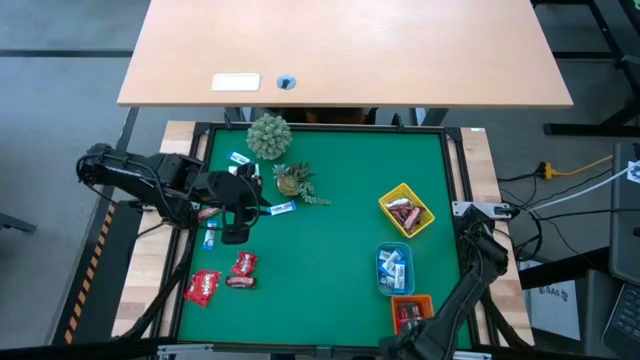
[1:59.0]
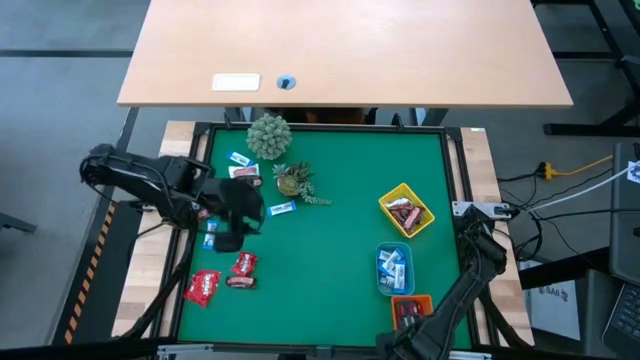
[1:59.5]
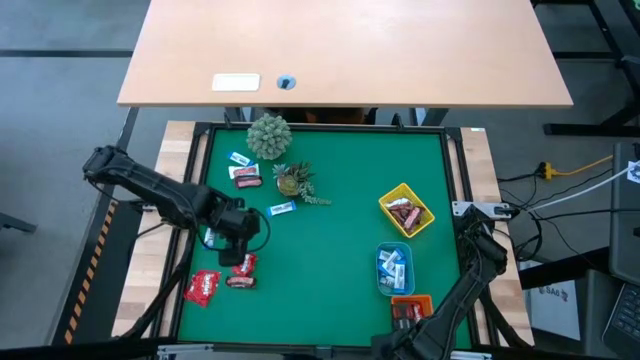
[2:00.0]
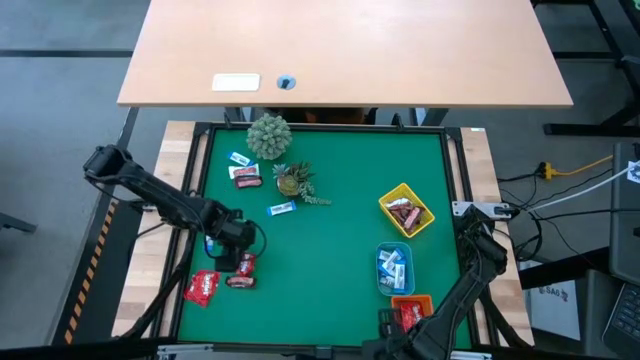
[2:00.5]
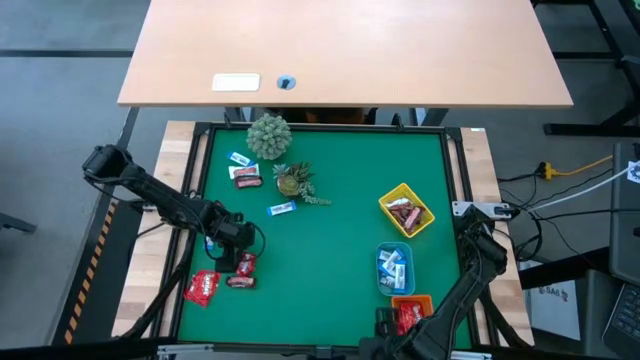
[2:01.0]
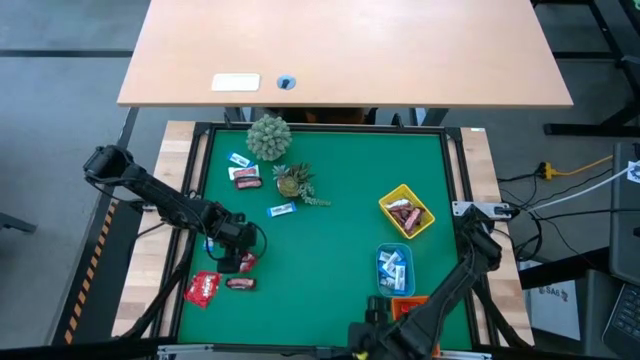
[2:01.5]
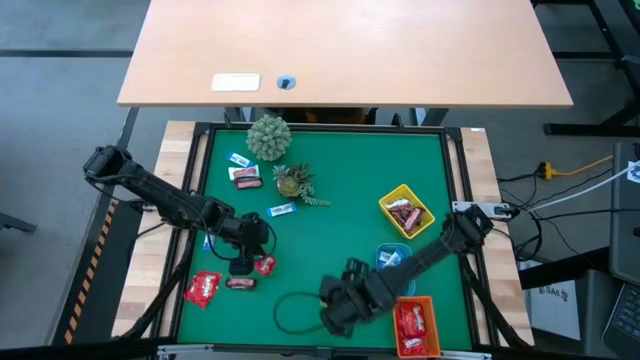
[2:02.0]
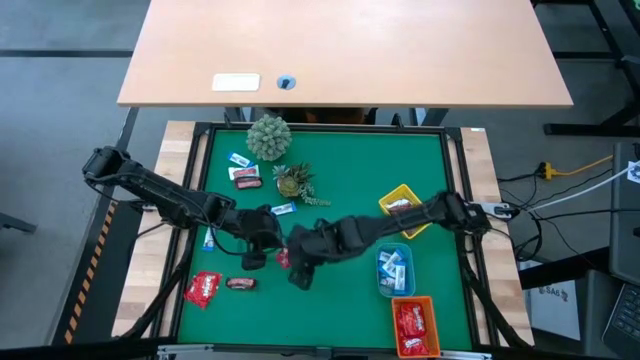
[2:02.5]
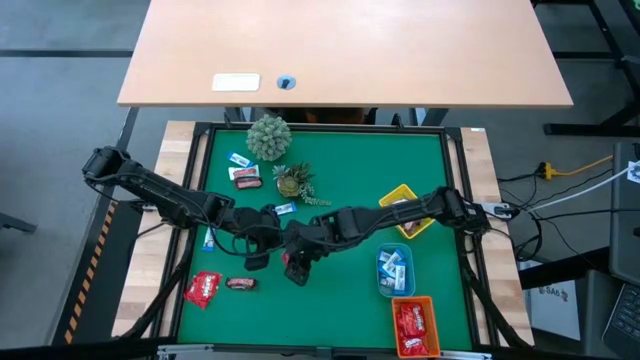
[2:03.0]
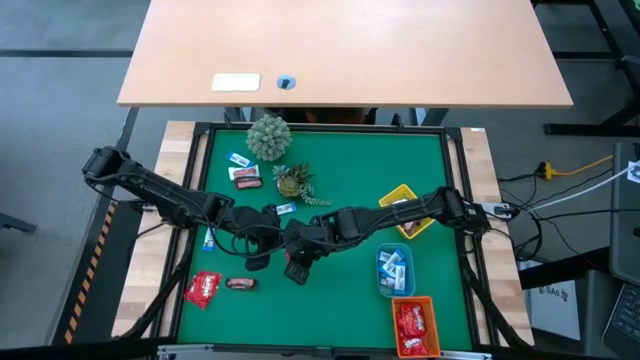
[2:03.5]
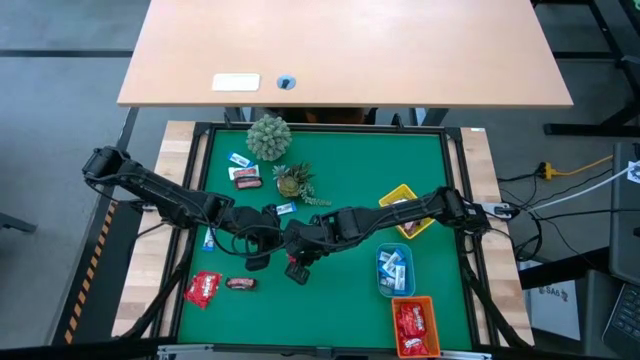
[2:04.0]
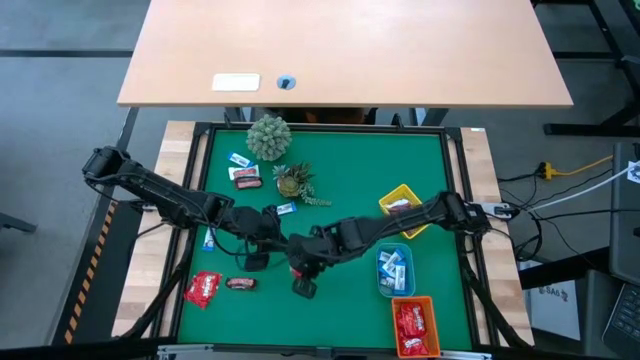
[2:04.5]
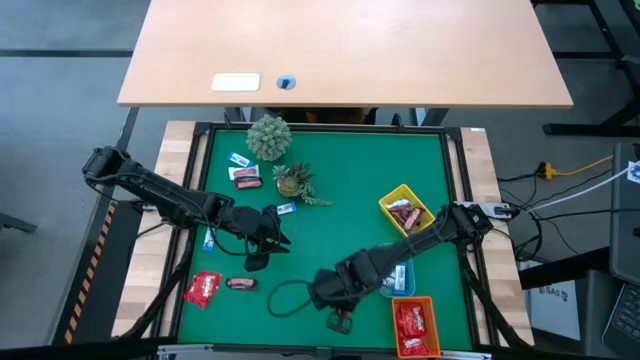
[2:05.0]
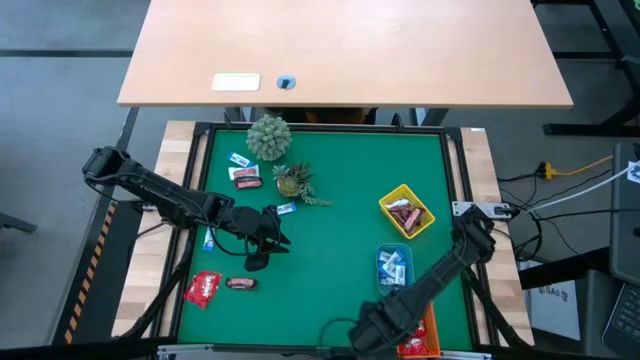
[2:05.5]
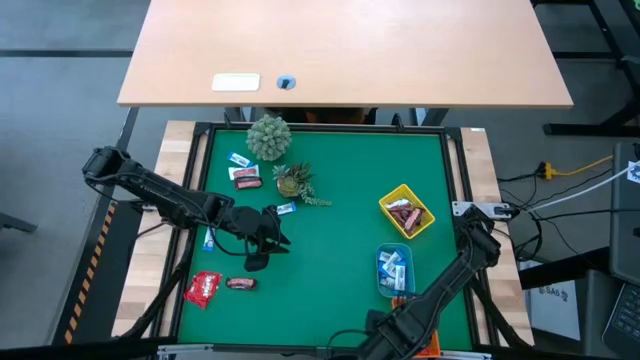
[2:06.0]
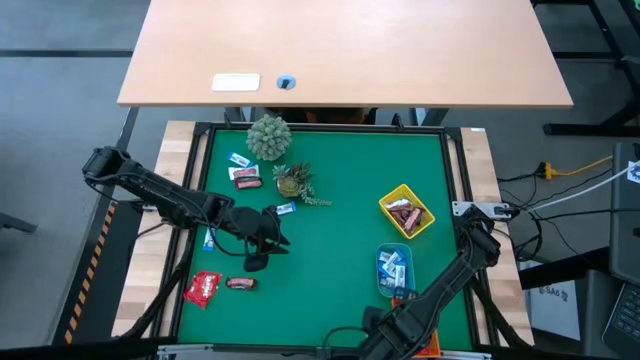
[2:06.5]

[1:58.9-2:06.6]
Task: Sort candy
Put the red candy into the orange bin

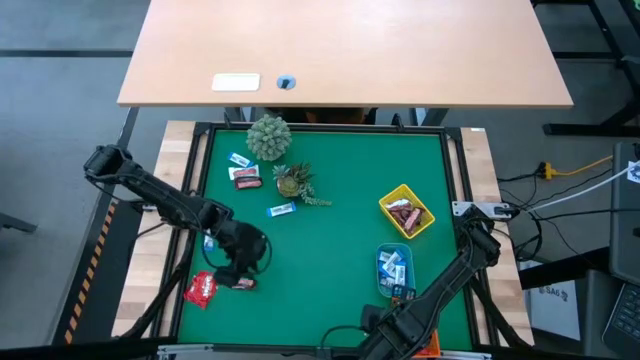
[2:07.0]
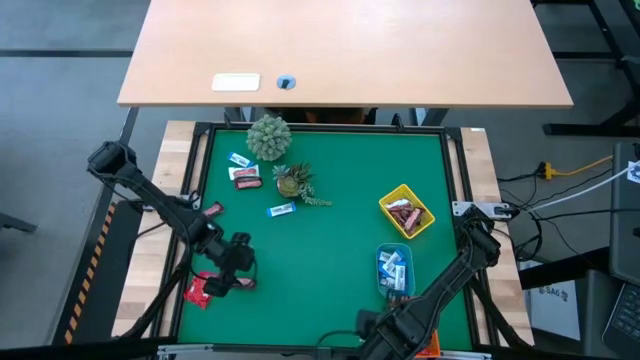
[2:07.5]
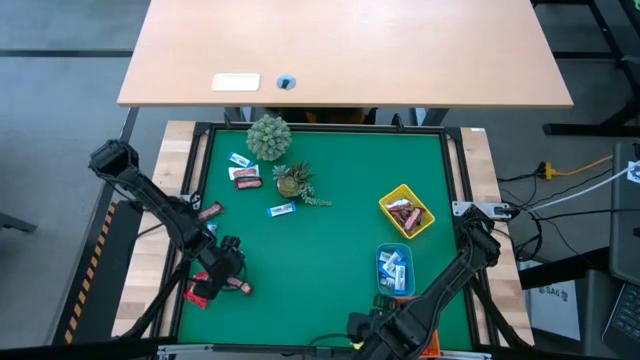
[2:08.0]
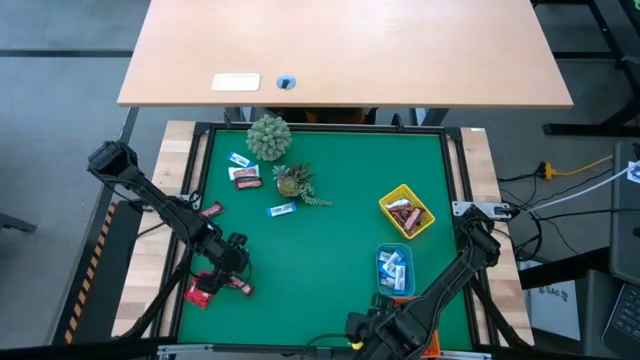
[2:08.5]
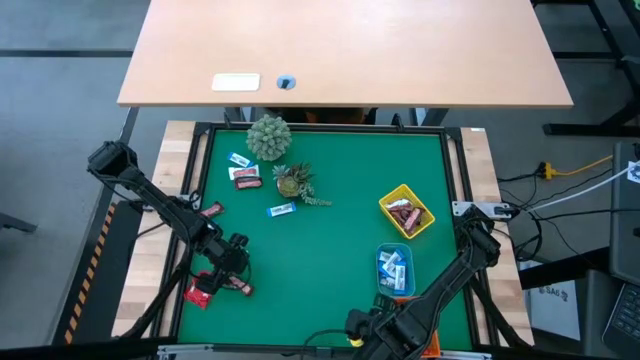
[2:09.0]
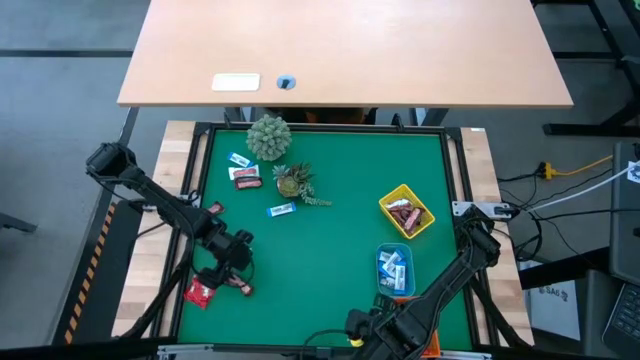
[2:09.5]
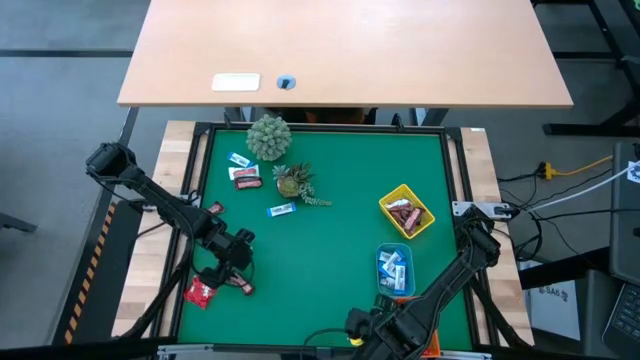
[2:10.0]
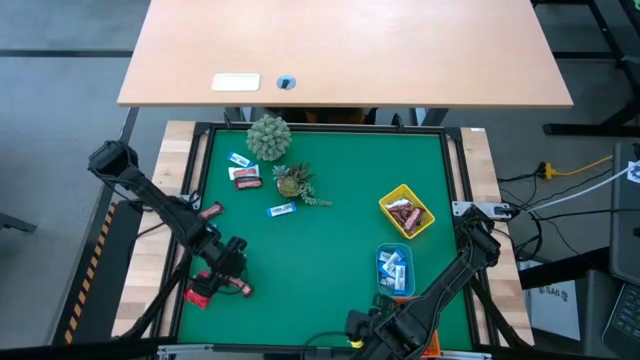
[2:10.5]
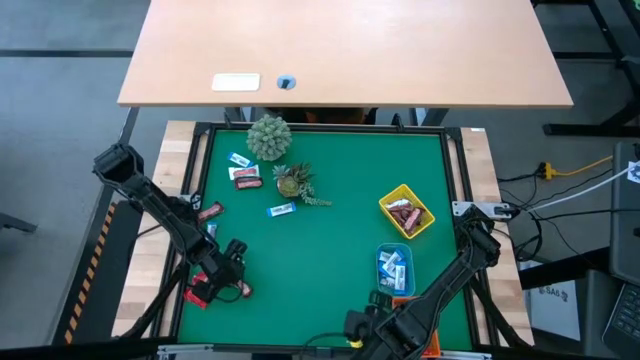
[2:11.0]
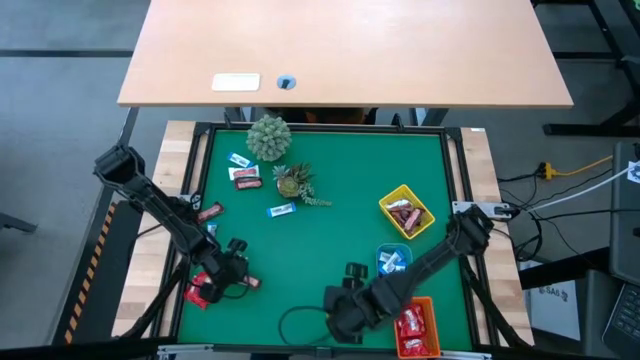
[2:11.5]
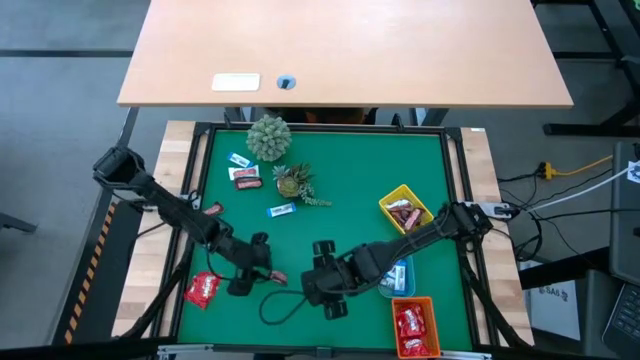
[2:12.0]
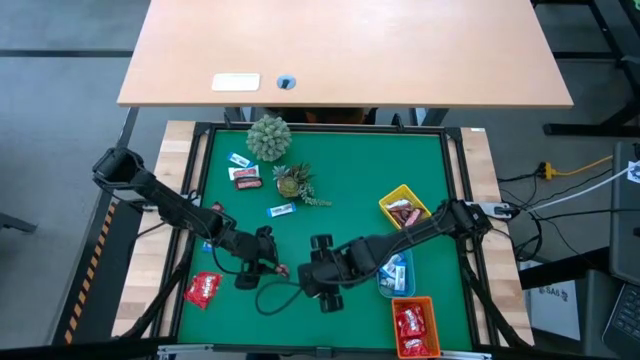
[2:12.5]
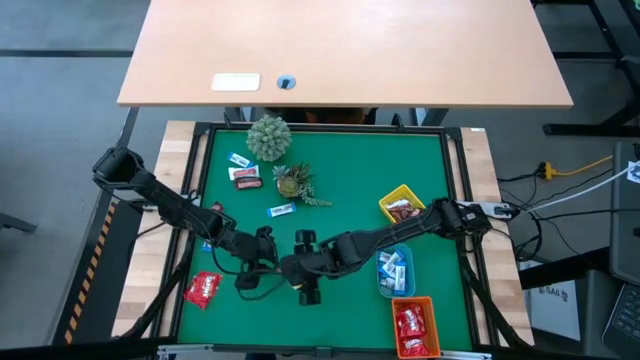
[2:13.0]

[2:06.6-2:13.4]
Put the brown candy into the yellow bin

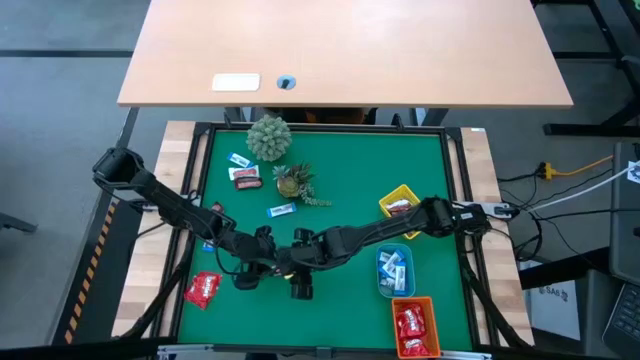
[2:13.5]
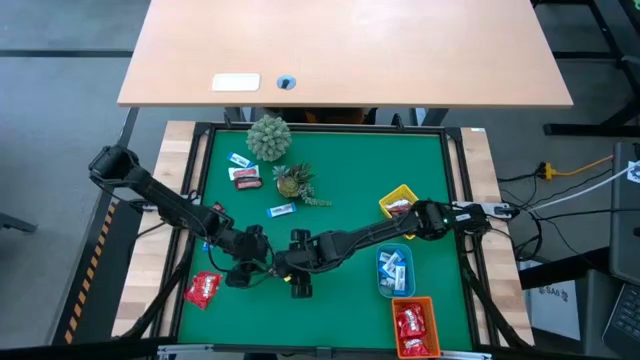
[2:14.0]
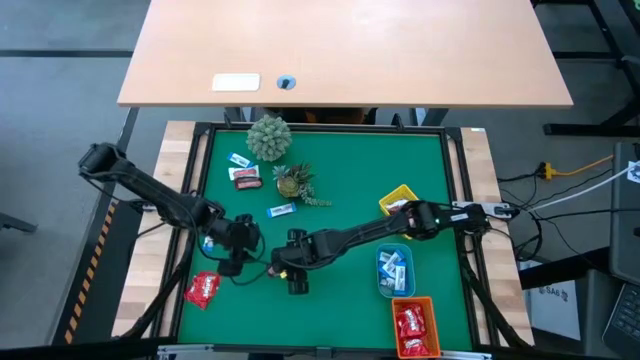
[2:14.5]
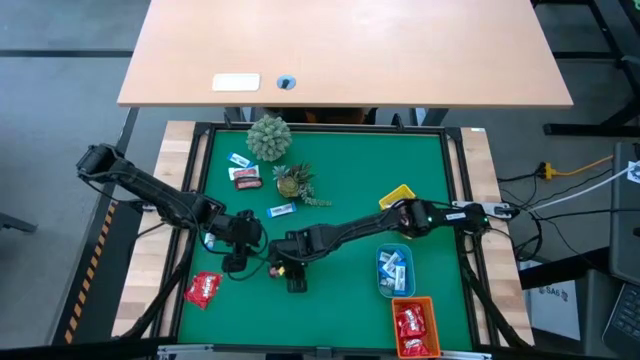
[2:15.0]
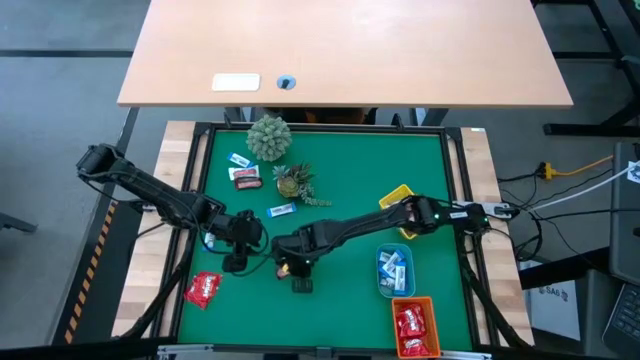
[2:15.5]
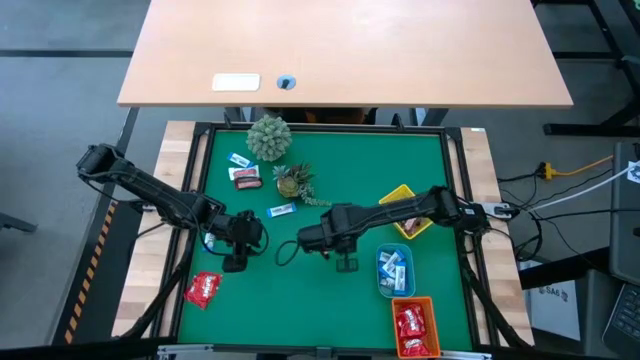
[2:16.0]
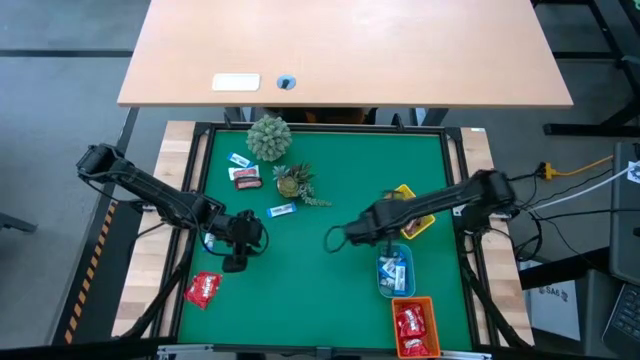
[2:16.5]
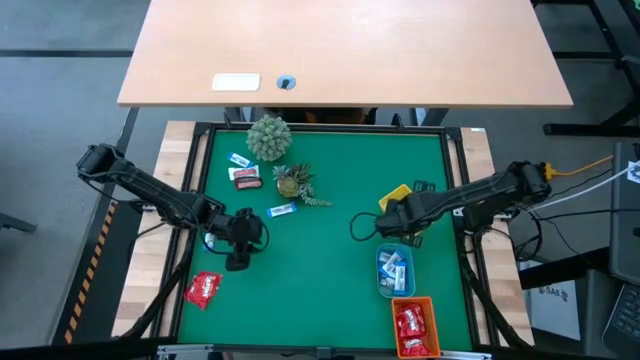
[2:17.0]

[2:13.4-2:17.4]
Put the brown candy into the yellow bin

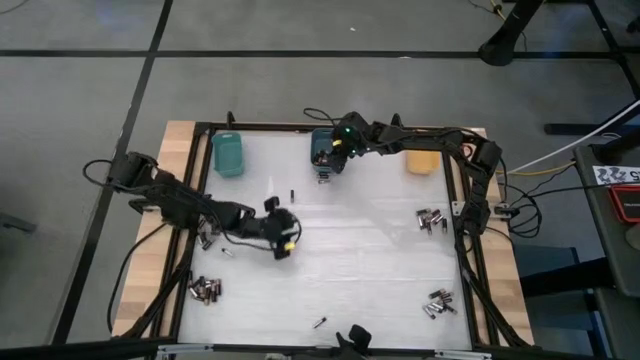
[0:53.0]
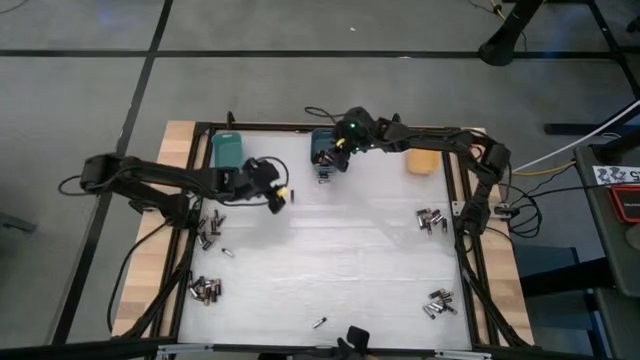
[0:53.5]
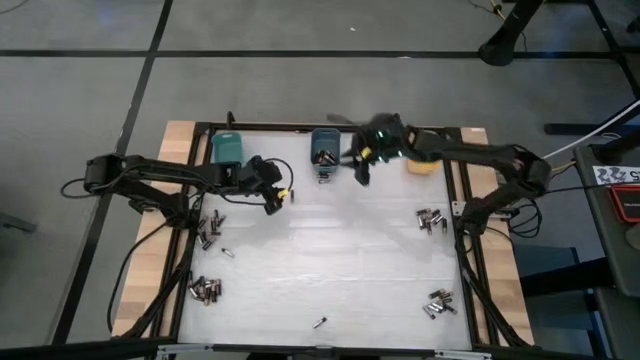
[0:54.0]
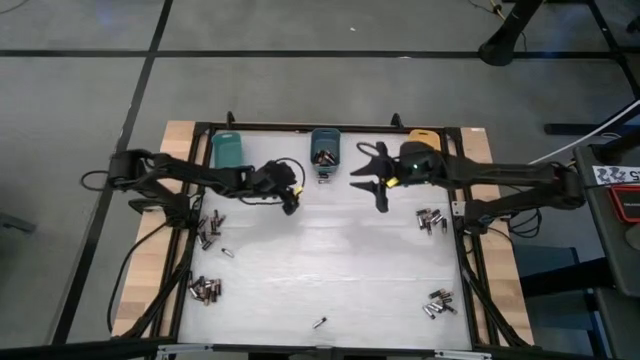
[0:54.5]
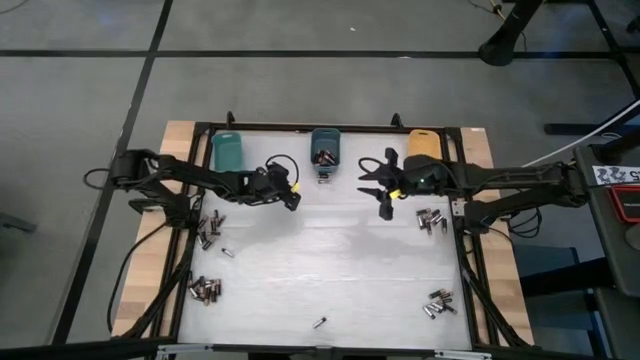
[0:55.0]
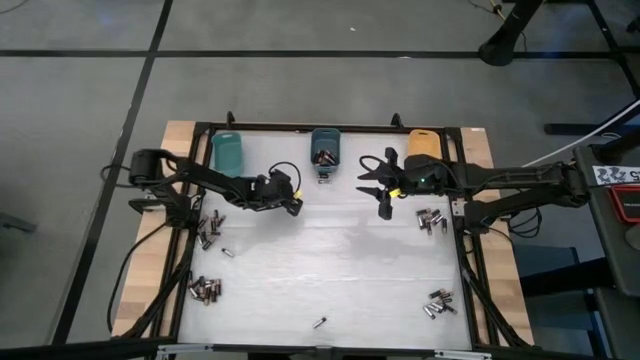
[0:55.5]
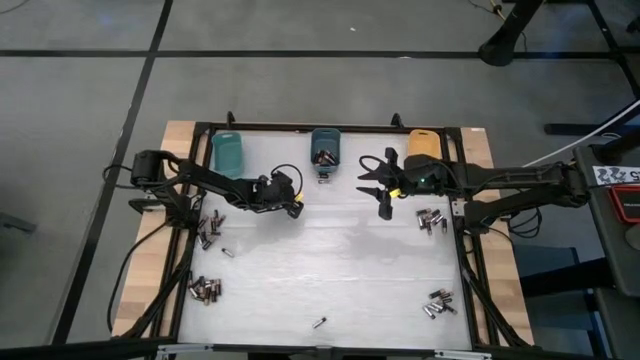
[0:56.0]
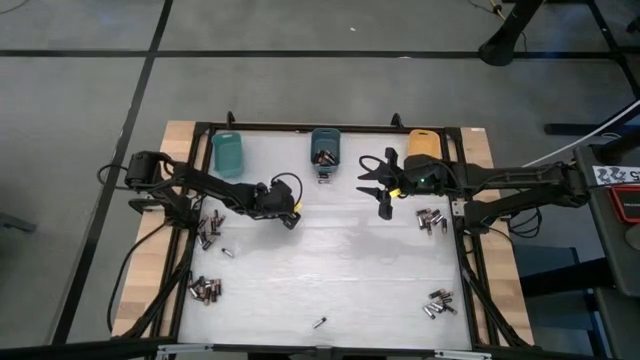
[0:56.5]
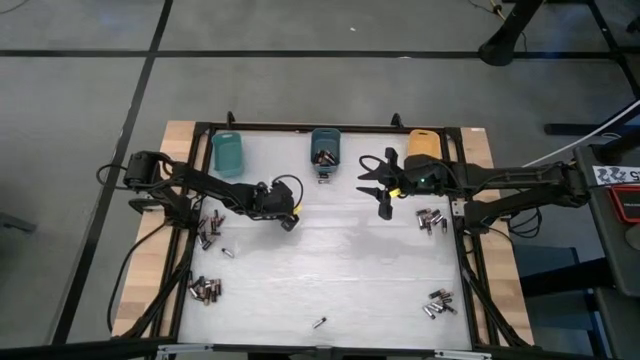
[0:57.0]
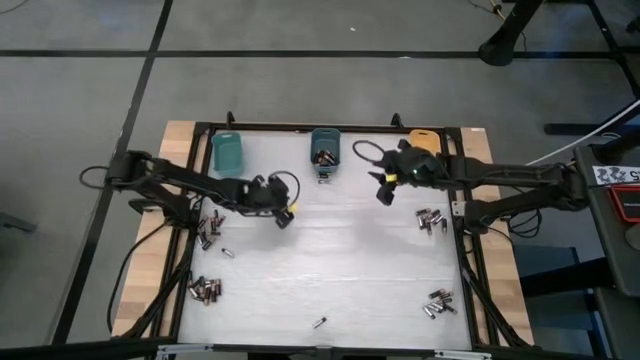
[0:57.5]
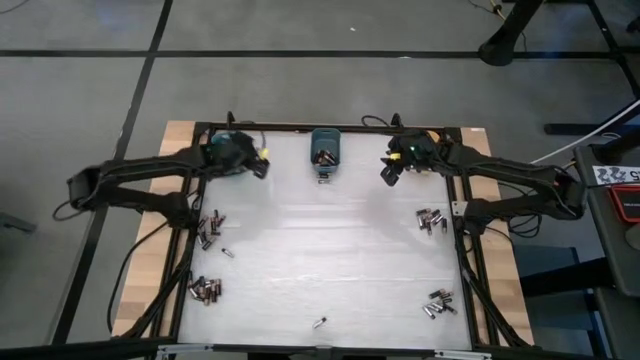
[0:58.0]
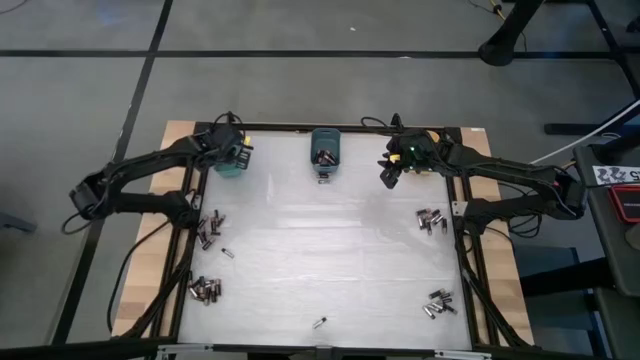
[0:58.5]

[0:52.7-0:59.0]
Task: Sort batteries
Put the brown battery into the green bin
